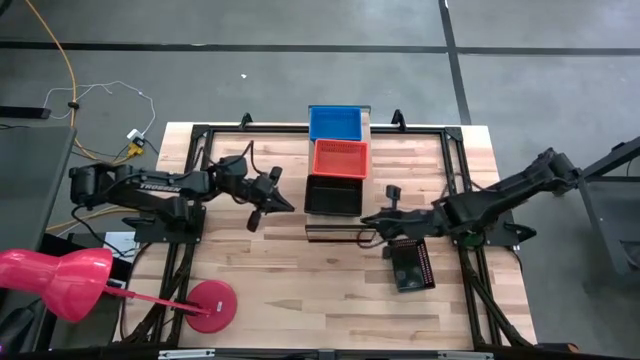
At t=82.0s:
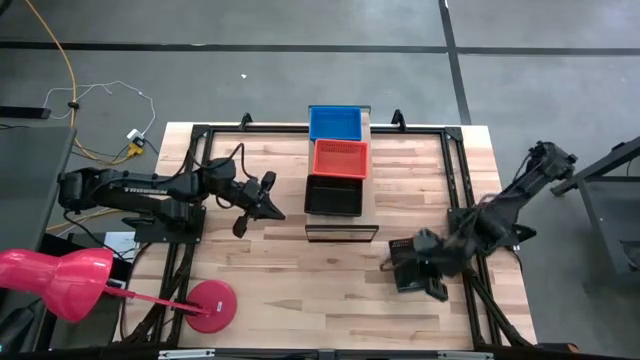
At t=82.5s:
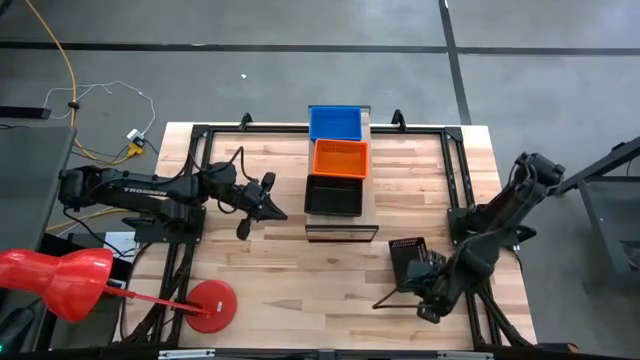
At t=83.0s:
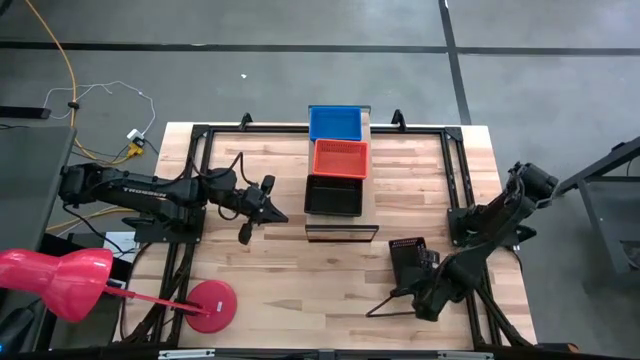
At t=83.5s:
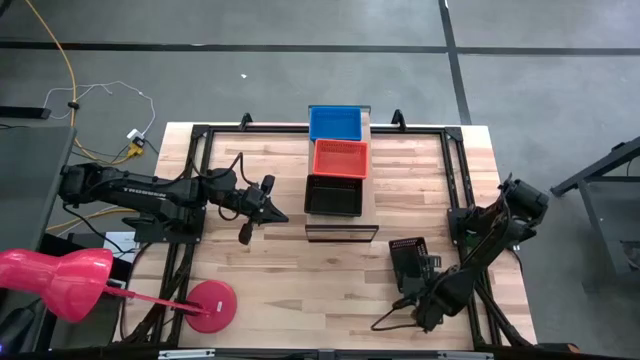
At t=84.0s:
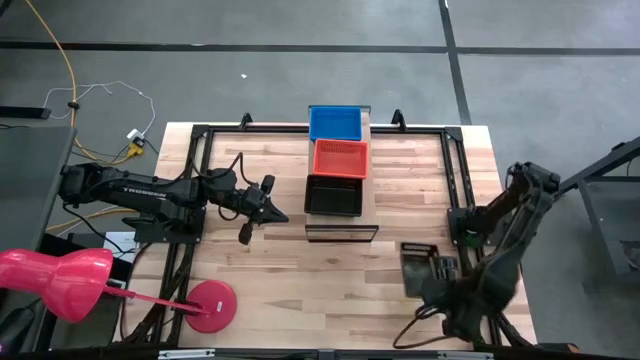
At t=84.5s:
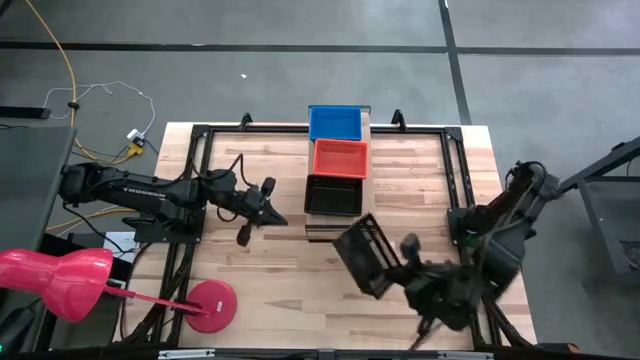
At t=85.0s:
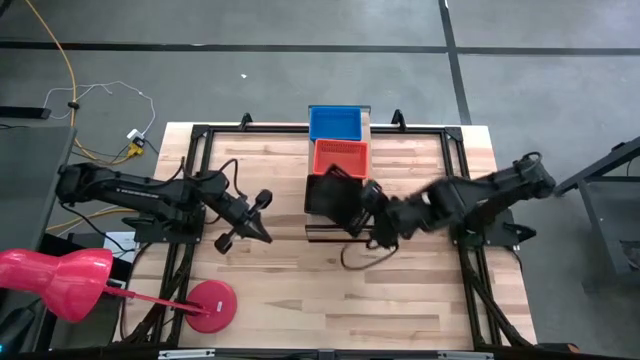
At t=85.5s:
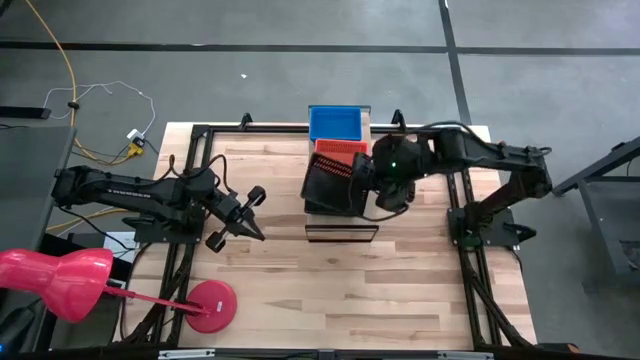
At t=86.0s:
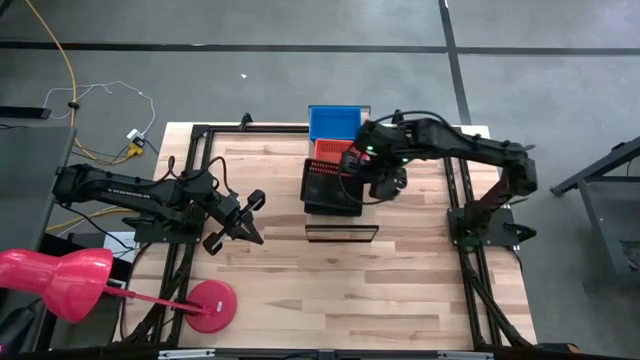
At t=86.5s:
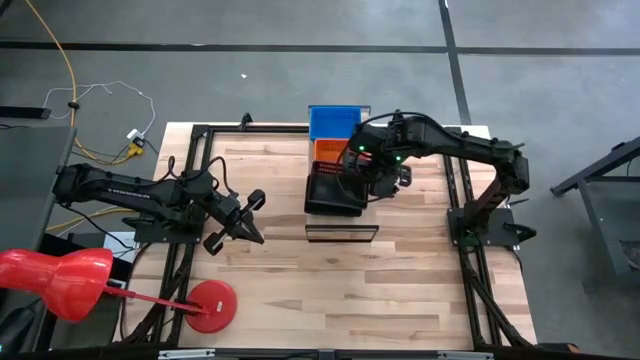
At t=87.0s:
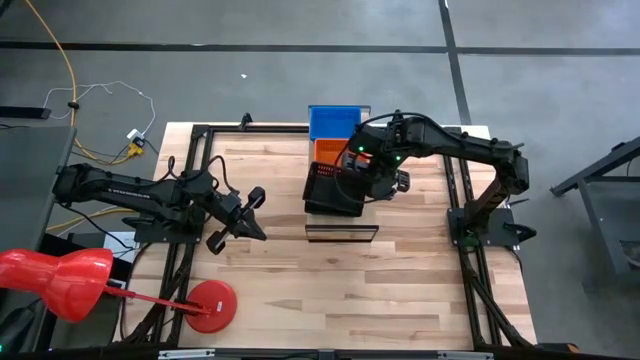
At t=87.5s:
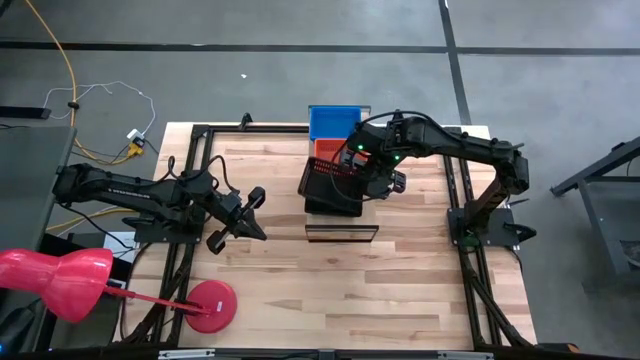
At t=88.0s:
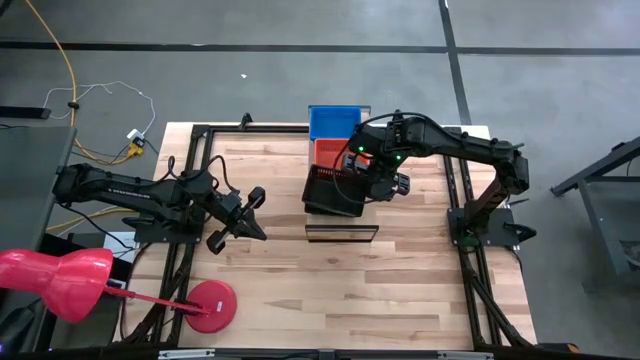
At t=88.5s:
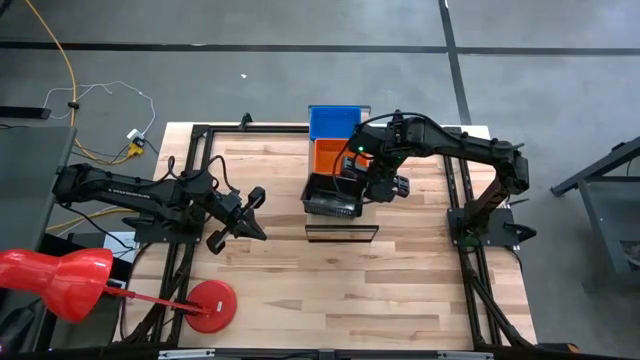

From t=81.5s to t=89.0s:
Task: Stack baskets on shelf by color
Stack the black bin on top of the black bins on the shelf

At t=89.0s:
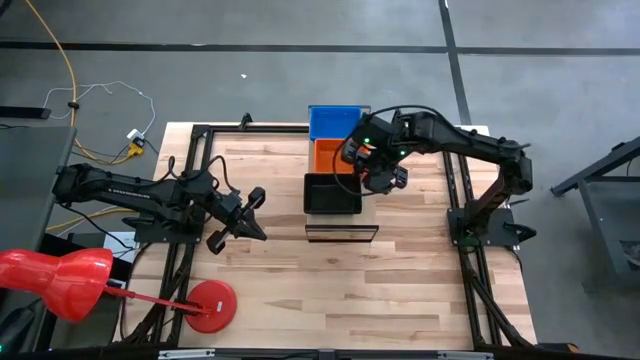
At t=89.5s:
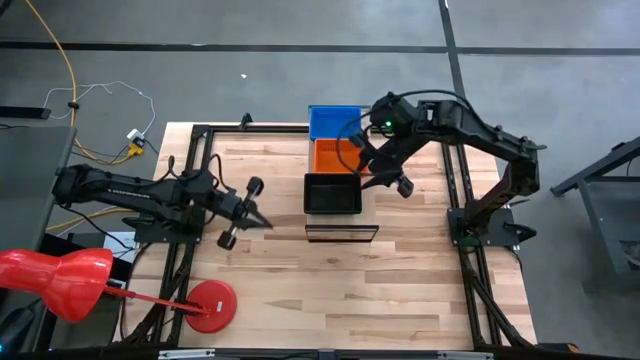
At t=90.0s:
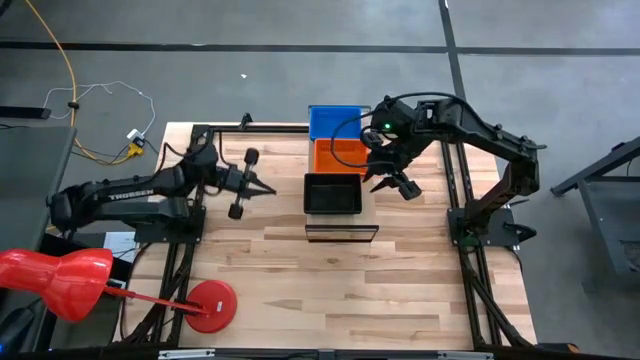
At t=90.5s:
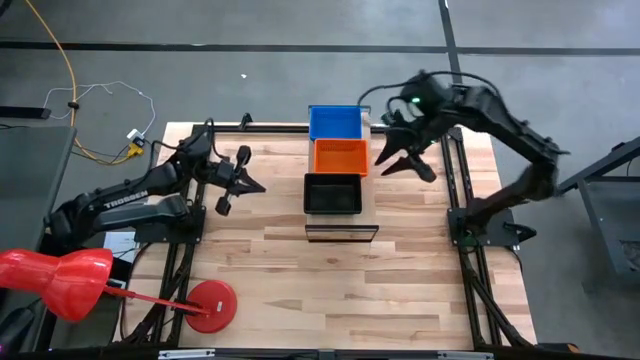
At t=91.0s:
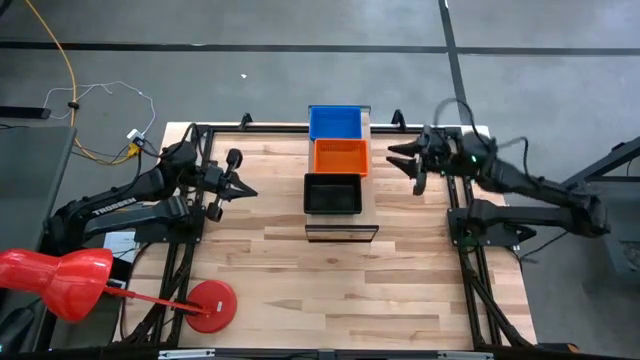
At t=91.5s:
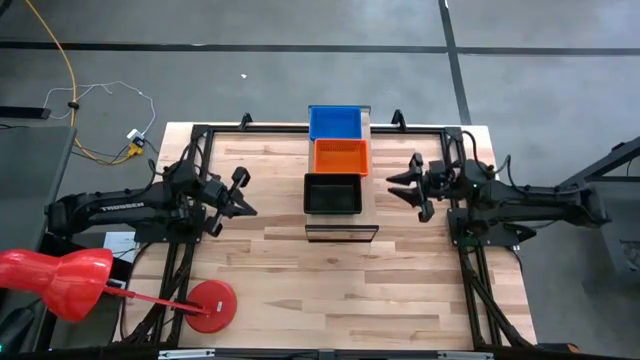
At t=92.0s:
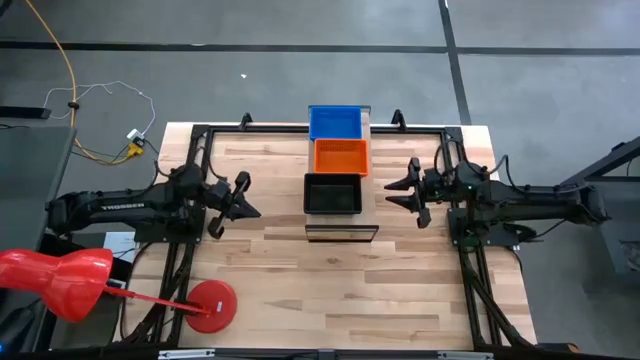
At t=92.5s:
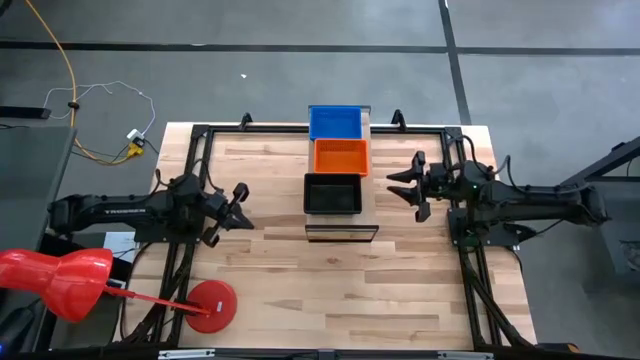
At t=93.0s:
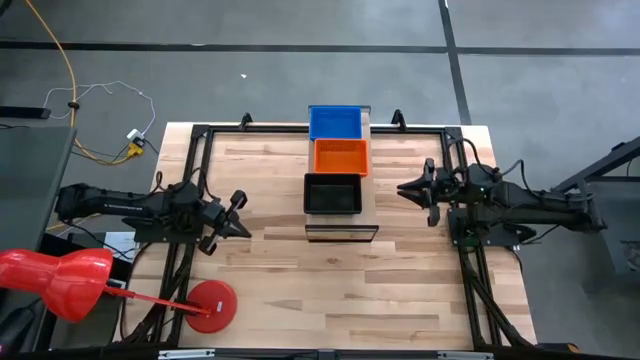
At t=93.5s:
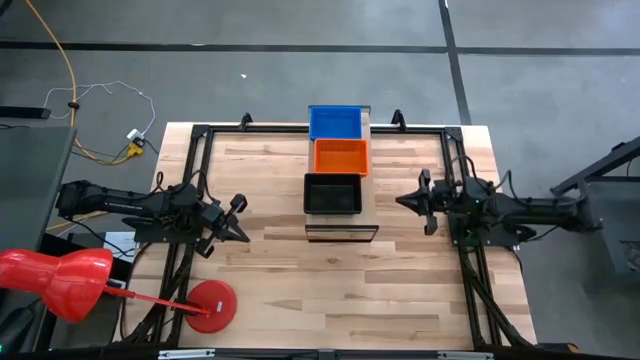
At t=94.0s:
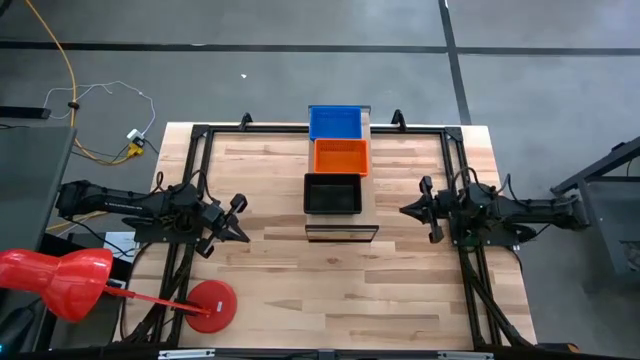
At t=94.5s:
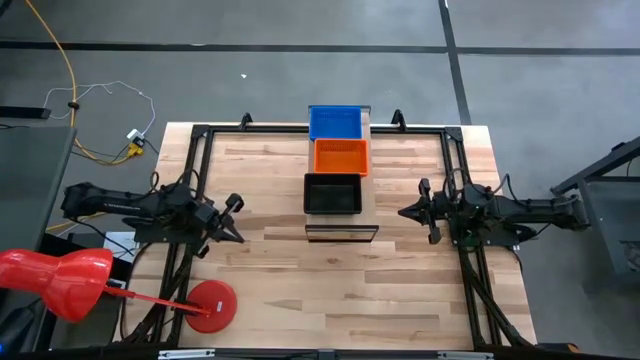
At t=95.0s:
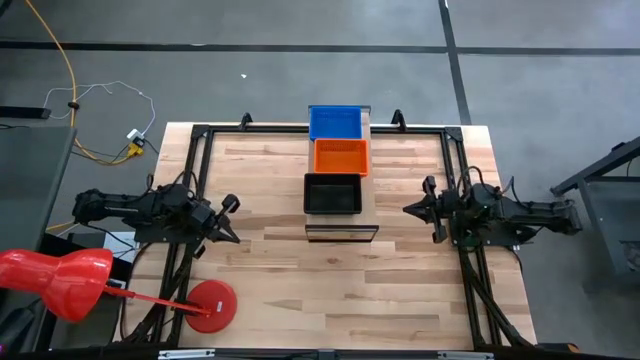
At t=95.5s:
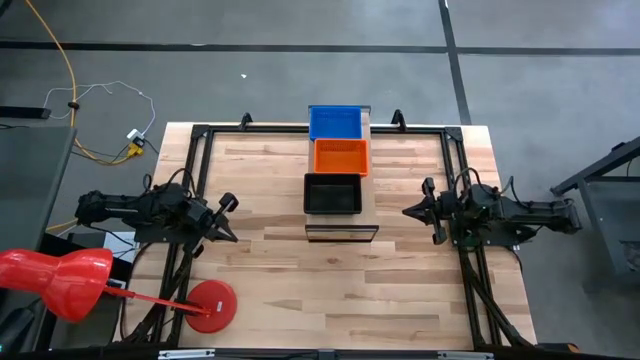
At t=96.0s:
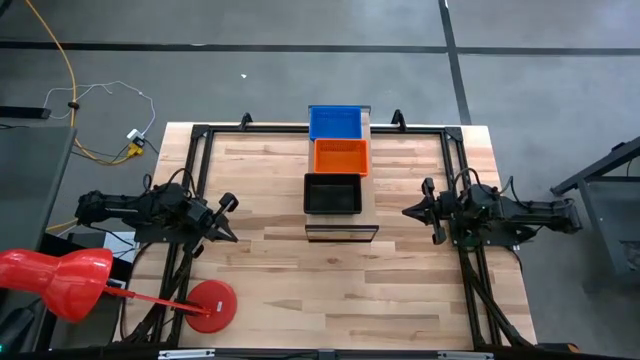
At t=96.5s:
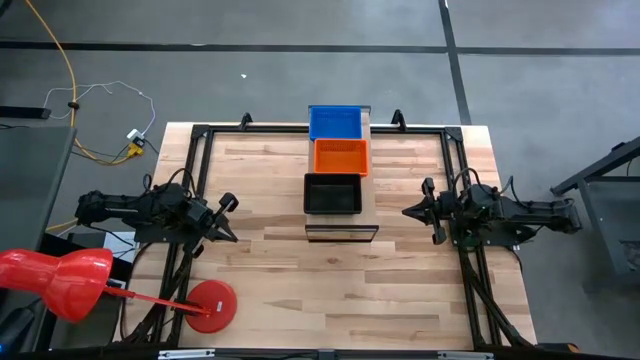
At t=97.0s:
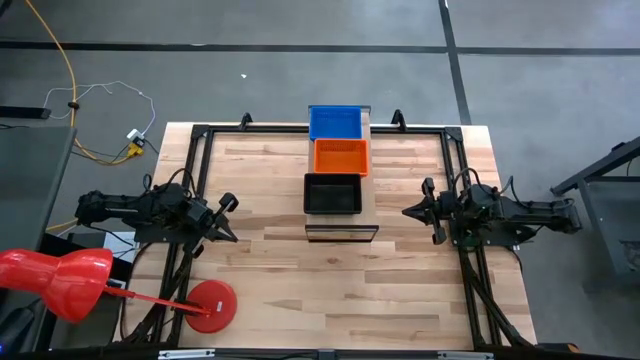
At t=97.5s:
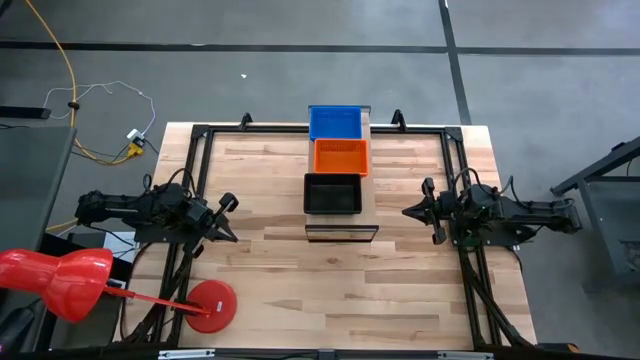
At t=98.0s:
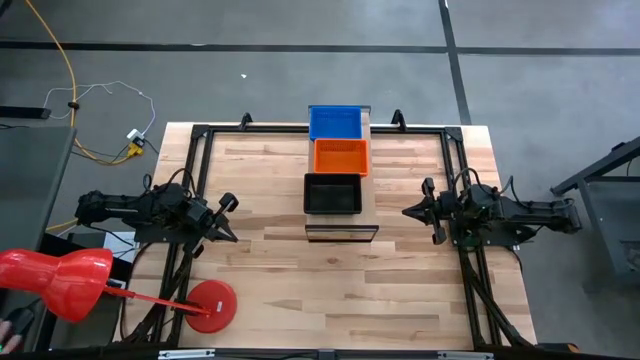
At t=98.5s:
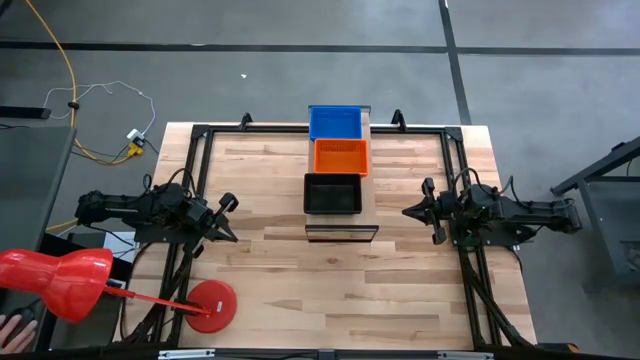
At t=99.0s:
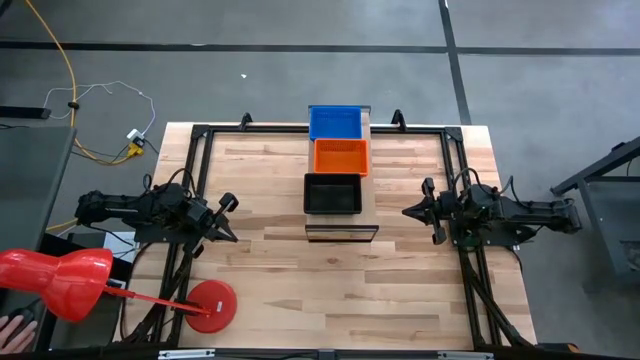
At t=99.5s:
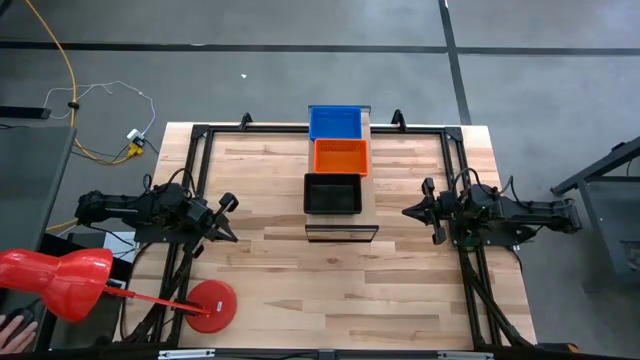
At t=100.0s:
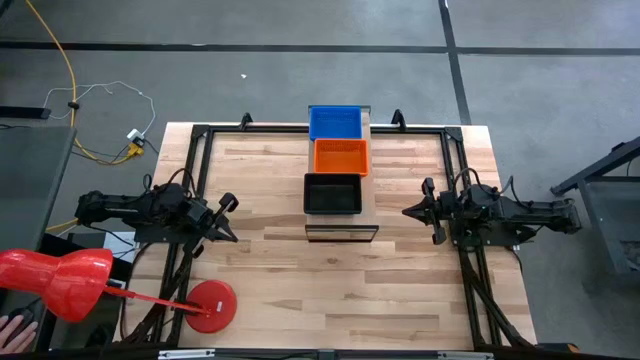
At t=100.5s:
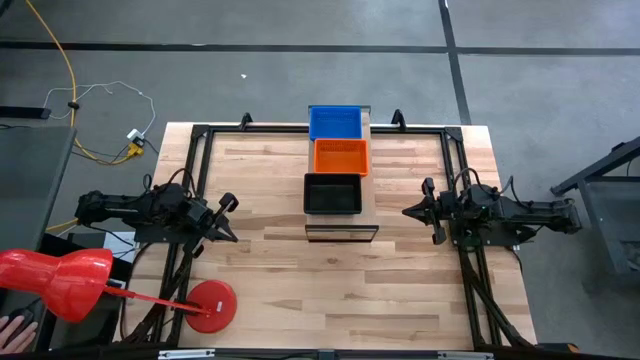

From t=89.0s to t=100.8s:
Return to Home Position

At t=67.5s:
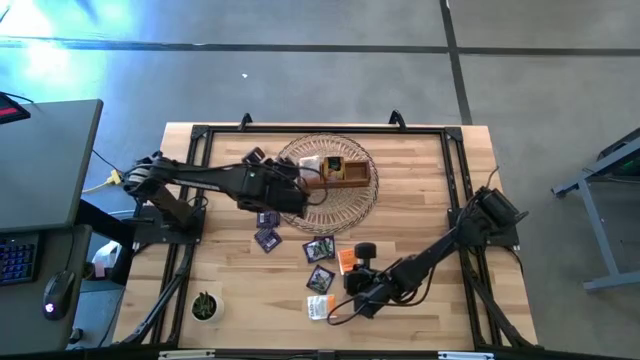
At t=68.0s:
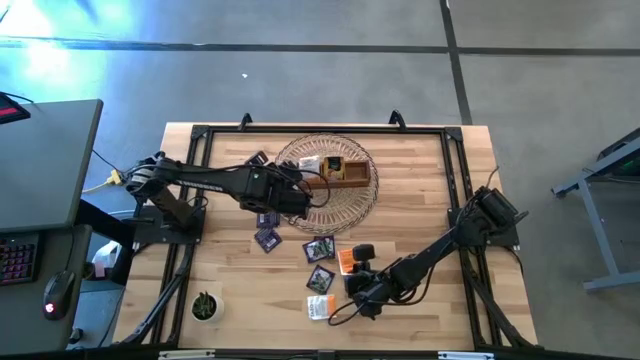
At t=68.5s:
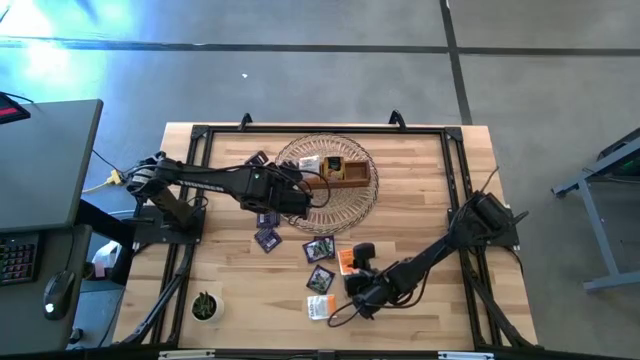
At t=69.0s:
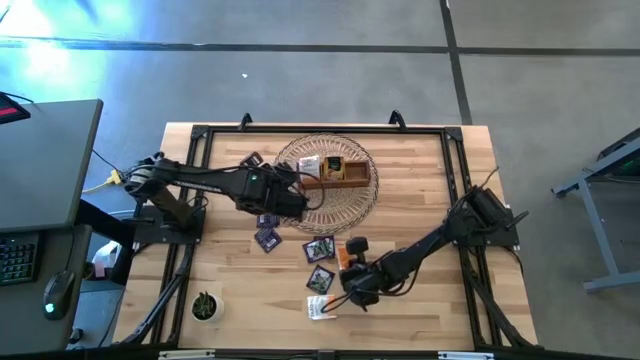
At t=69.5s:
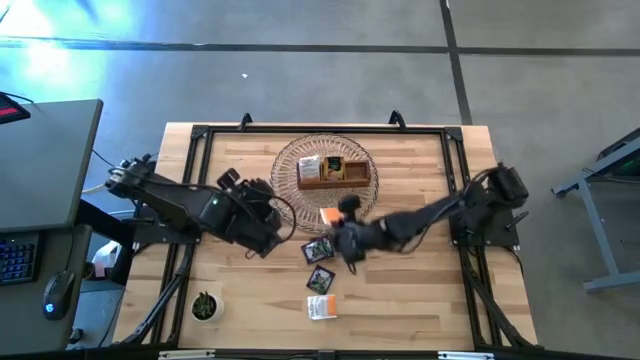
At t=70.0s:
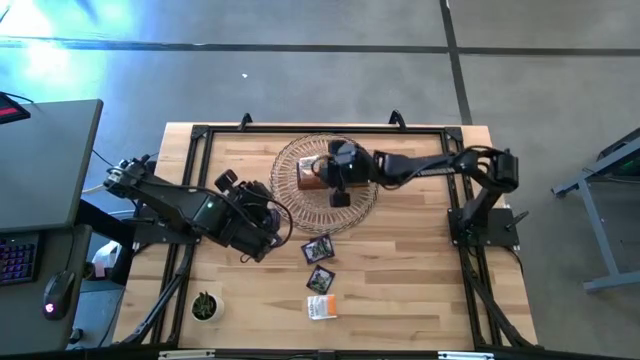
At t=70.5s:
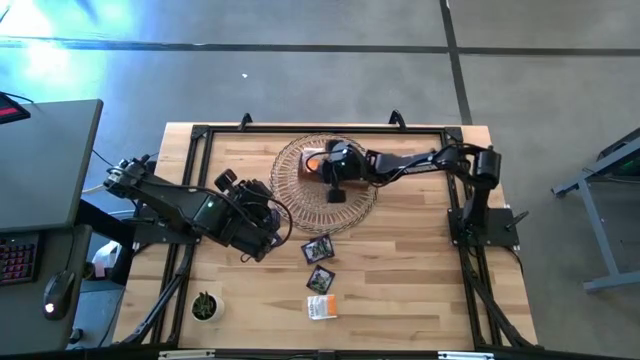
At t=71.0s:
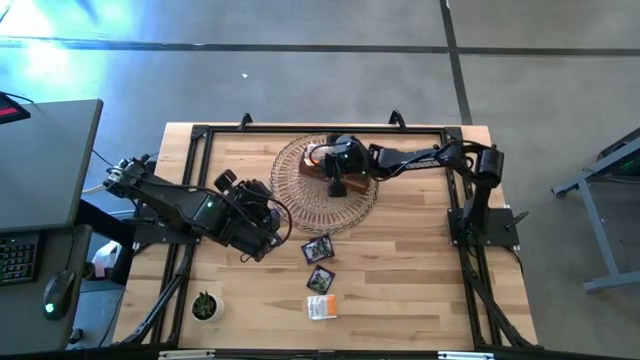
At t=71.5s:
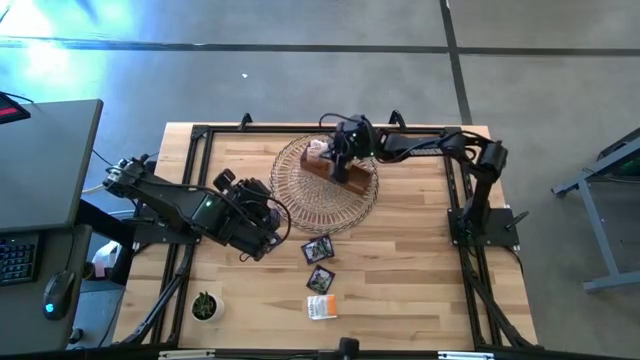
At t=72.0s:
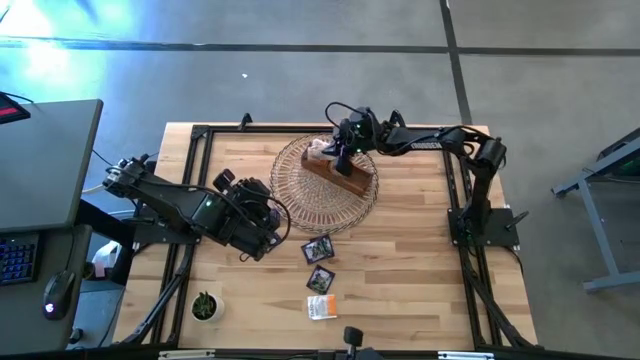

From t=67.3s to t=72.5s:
Task: Pick & Place Tea
Put the white tea bag into the left section of the wooden organizer
